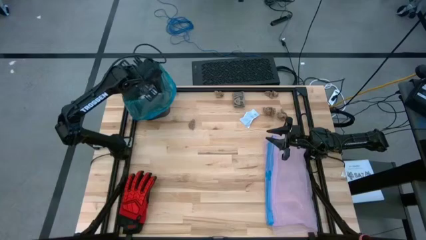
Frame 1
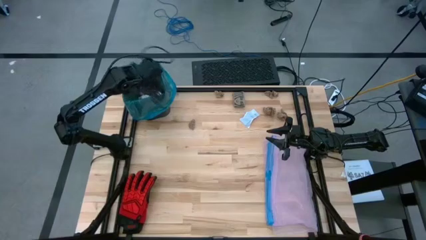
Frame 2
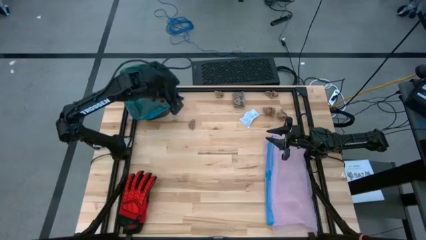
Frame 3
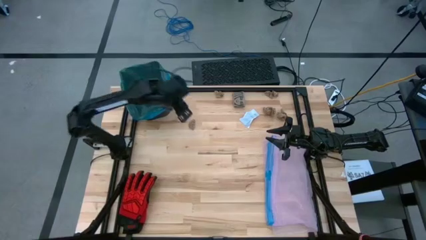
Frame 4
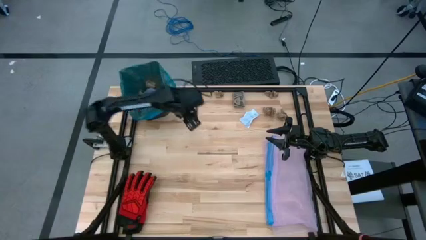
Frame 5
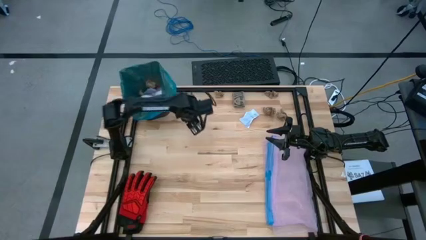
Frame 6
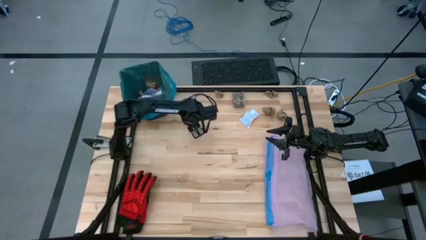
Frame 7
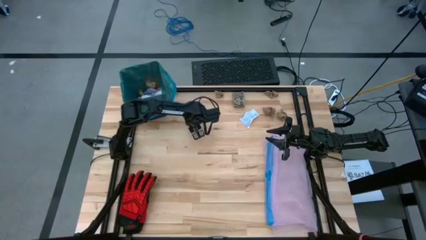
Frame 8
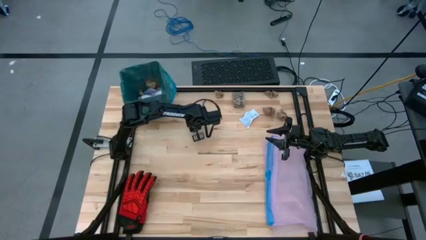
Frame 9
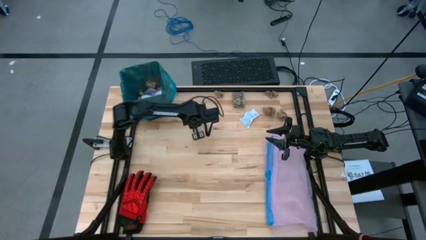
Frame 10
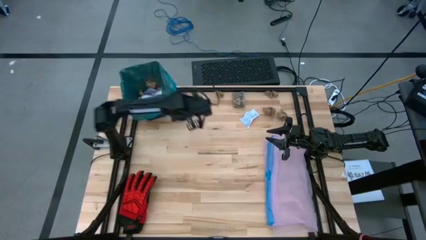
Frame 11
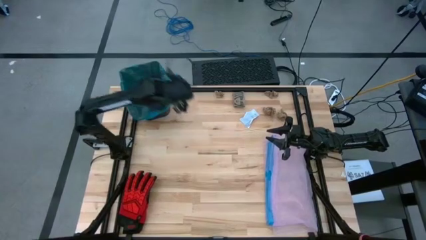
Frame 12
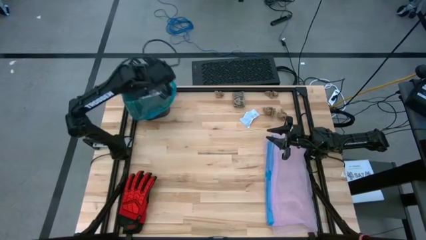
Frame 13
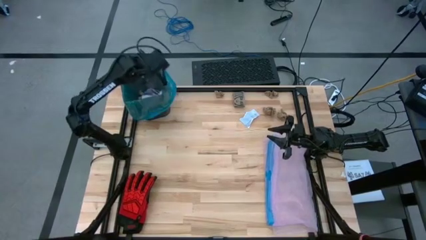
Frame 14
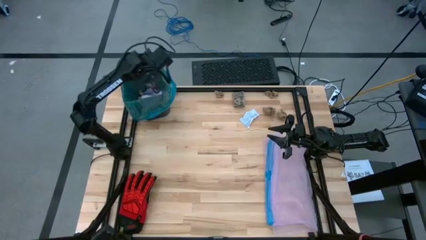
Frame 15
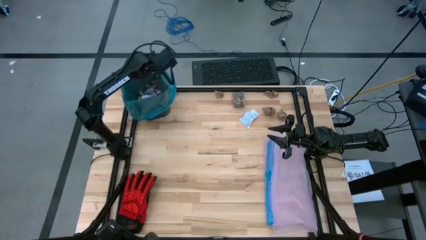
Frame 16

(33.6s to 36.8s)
Task: place trash/remove bag and relplace
Put the brown napkin in the trash bin

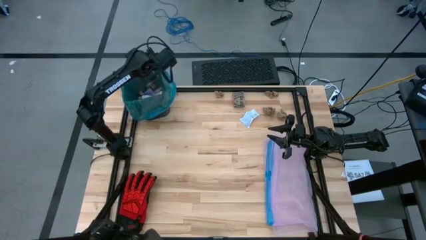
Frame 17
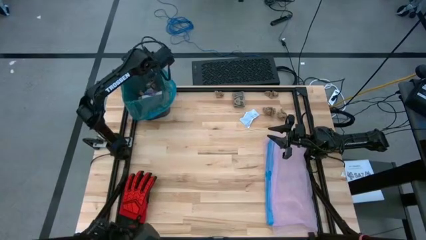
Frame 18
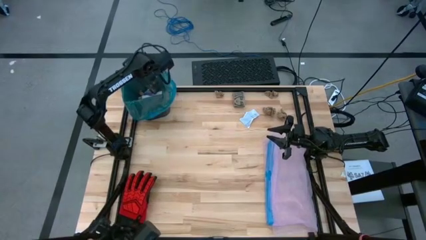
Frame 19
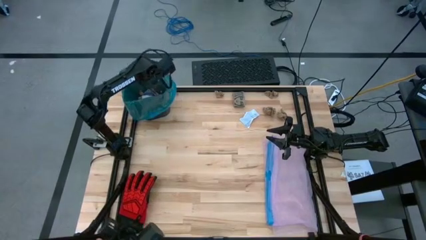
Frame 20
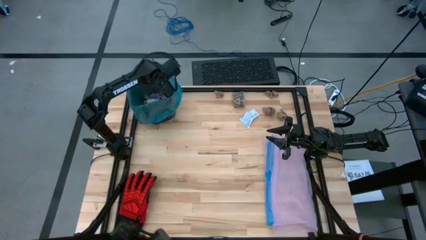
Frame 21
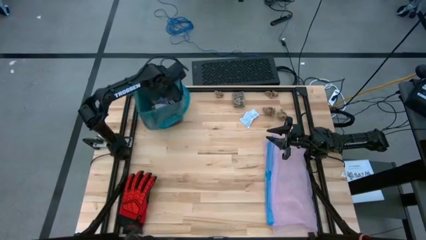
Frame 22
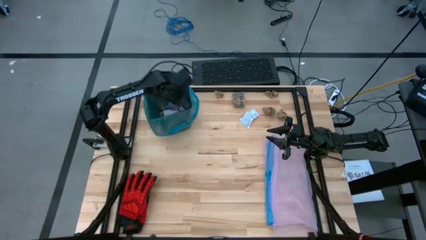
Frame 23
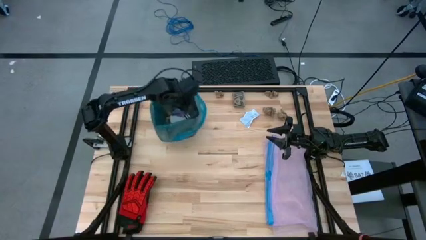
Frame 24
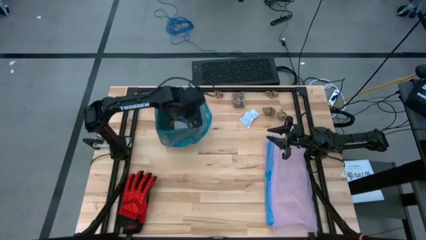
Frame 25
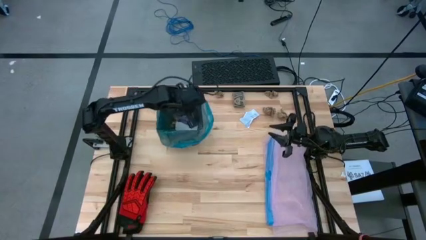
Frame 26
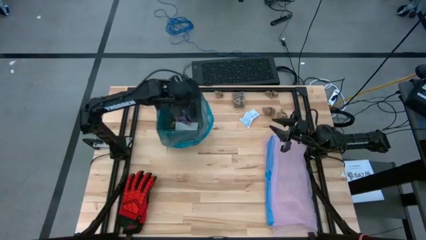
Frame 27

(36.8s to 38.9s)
Move the trash bin to the center of the table

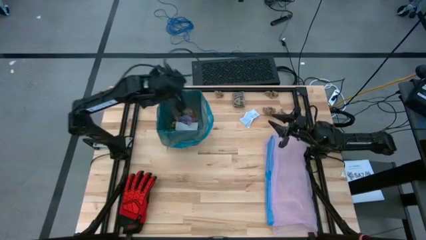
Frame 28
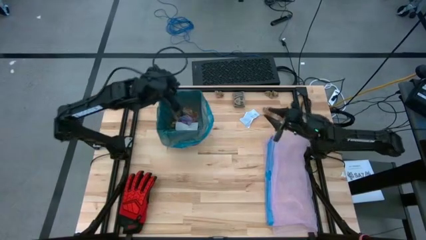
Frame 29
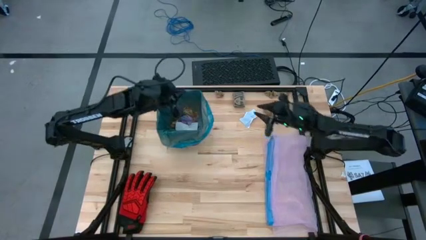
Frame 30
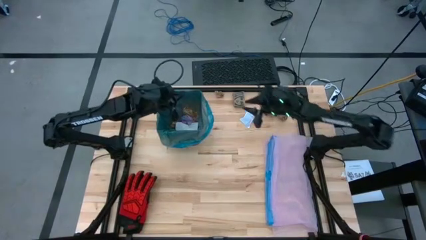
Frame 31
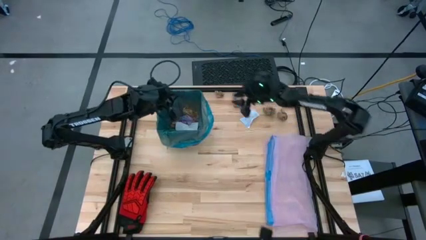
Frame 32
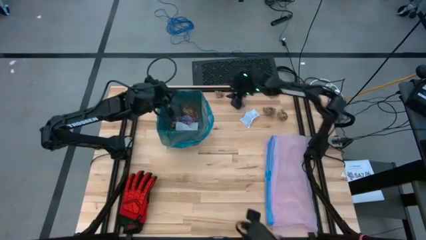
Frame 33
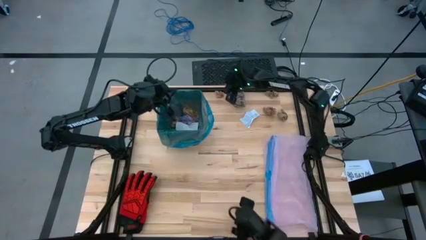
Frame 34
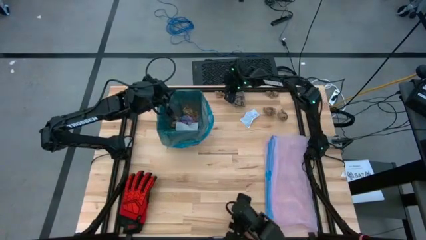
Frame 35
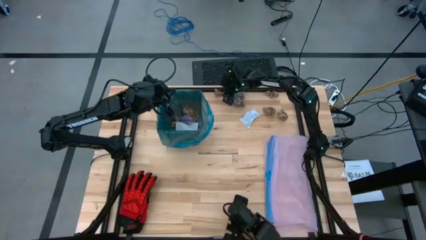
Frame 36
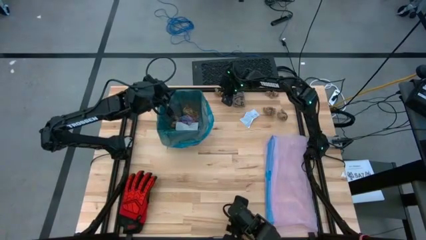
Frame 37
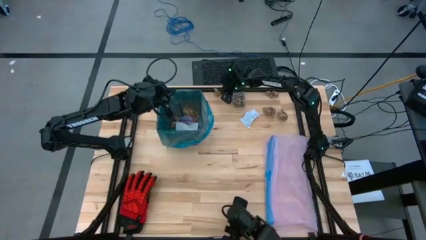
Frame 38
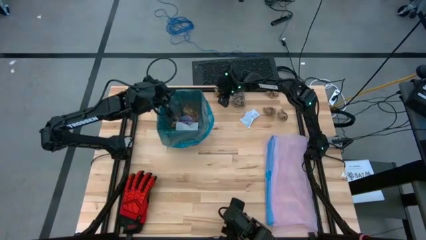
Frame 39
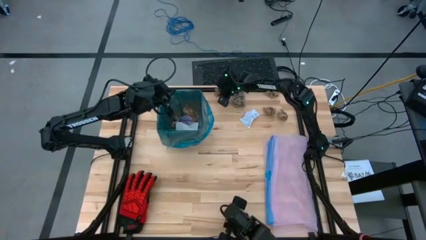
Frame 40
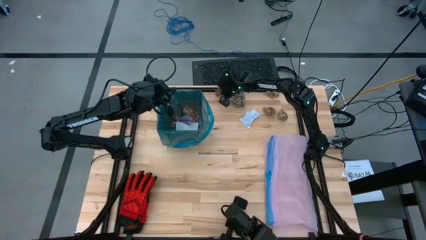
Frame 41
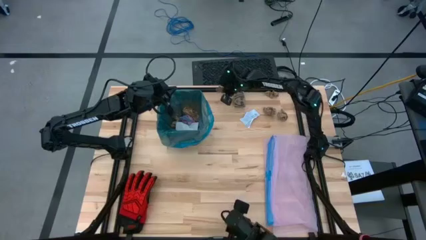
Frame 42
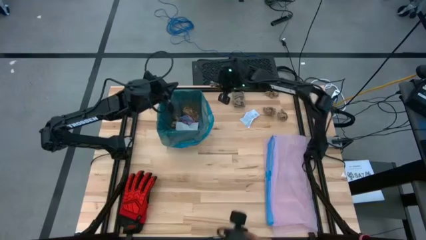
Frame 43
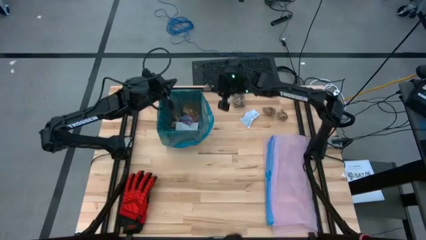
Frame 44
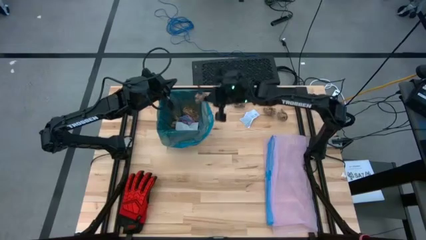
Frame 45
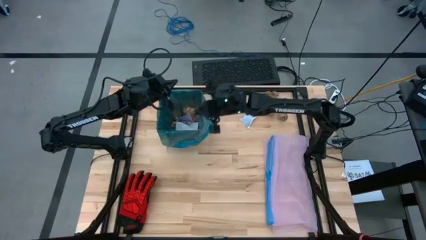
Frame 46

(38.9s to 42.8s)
Put the brown napkin in the trash bin

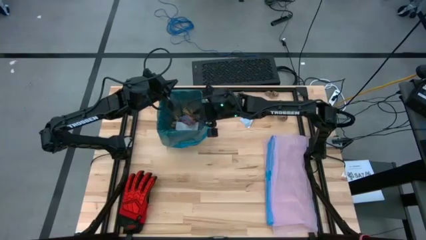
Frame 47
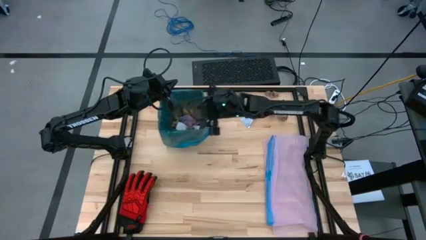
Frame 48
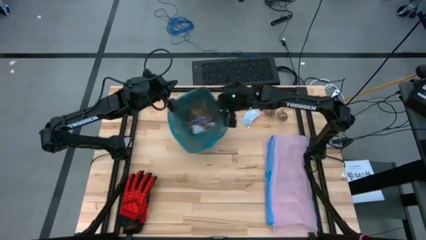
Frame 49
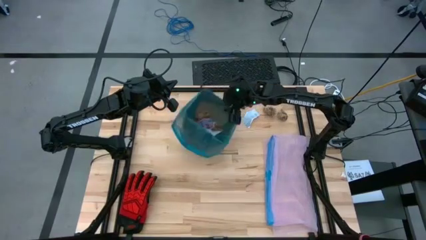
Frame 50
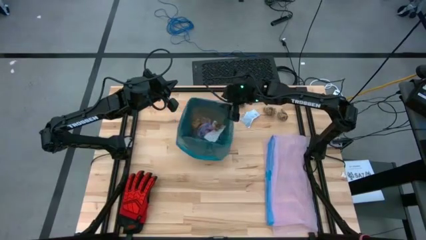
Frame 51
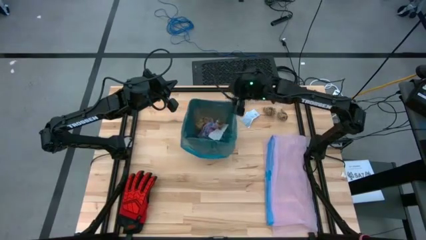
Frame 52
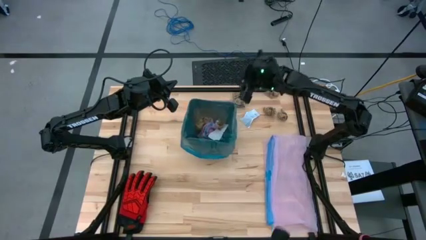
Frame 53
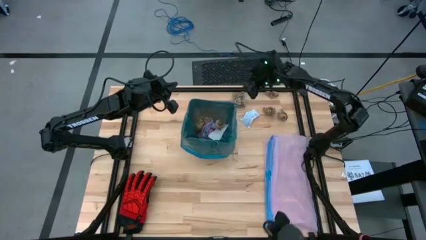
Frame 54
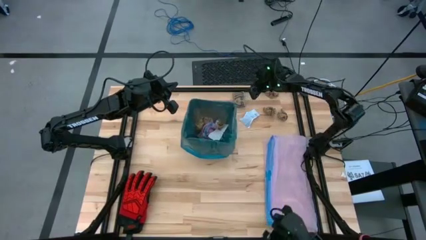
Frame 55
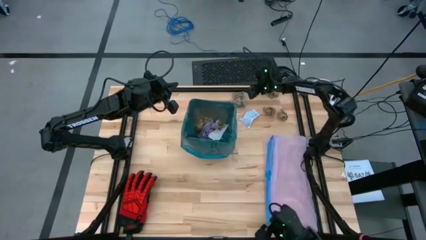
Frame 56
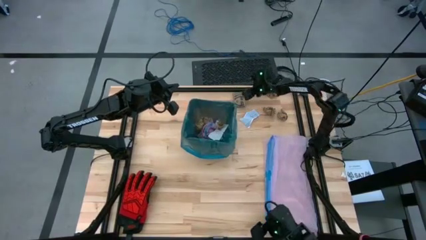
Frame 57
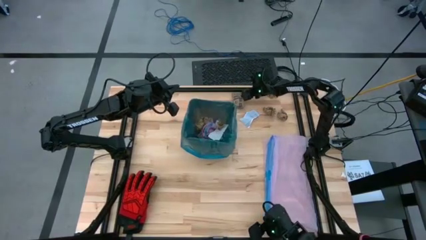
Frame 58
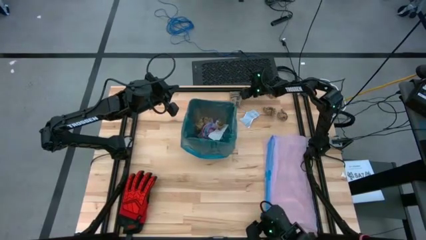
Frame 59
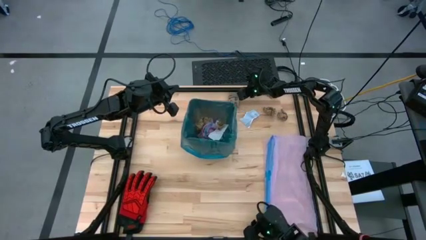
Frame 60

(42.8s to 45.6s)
Put the cardboard coffee sleeve in the trash bin

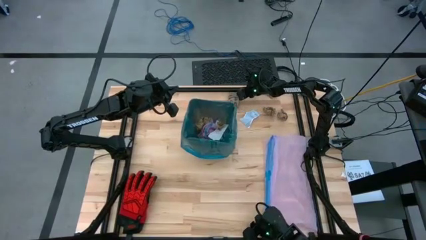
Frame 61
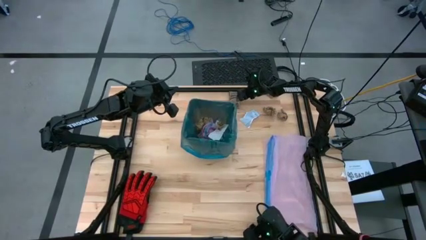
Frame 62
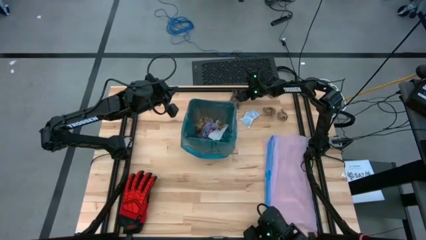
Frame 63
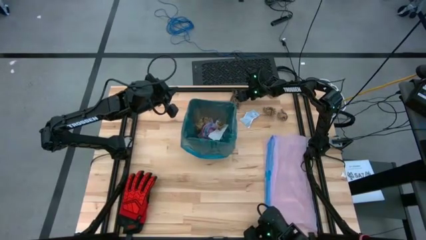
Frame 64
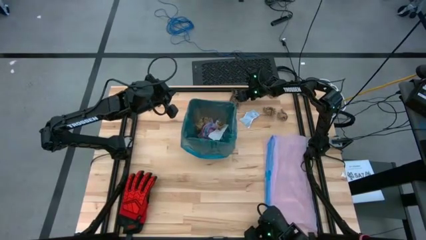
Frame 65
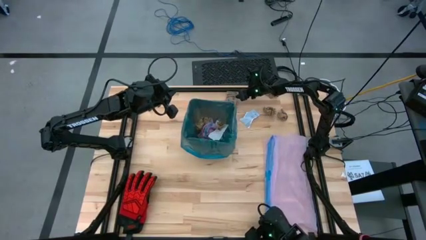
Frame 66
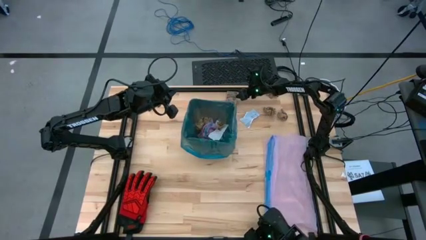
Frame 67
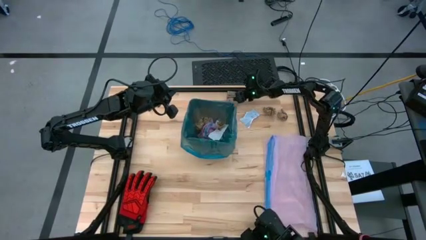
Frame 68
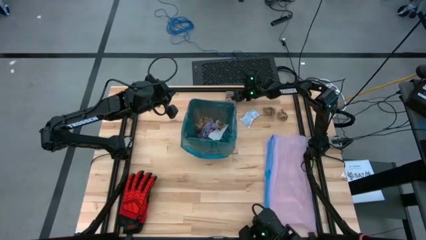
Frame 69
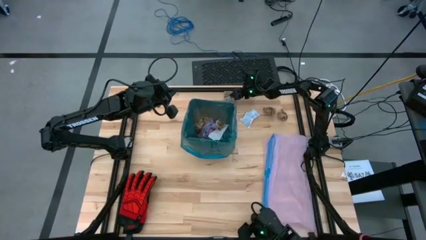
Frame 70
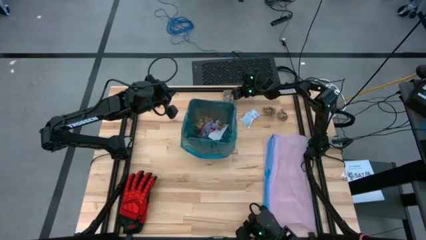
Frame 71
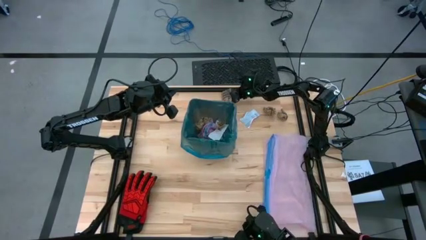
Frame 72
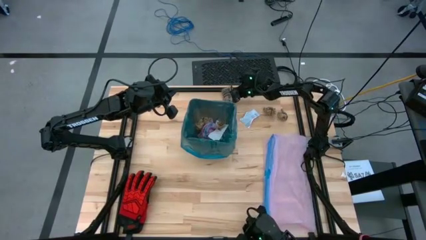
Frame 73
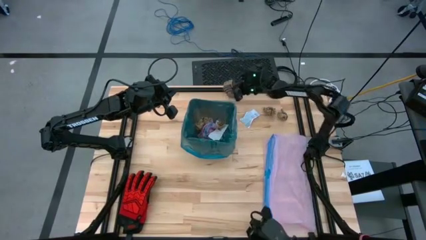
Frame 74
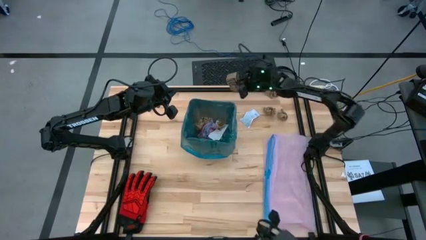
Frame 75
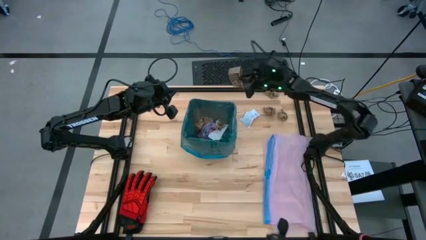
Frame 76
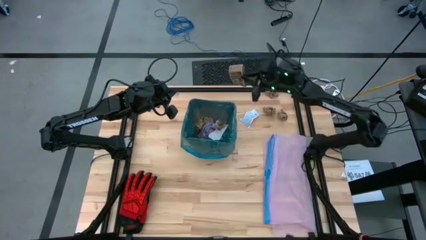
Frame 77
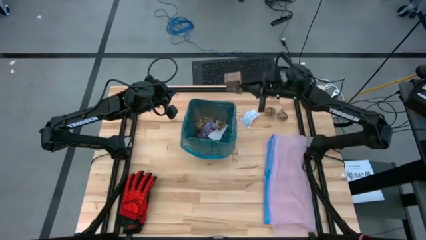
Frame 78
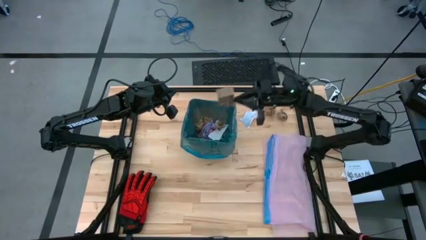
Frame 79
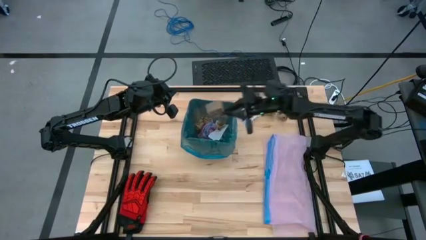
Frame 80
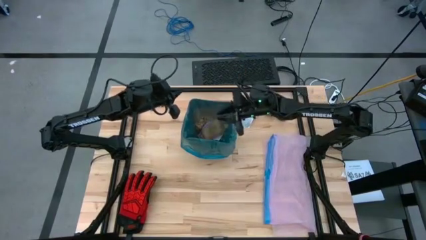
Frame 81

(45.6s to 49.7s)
Put the cardboard coffee sleeve in the trash bin

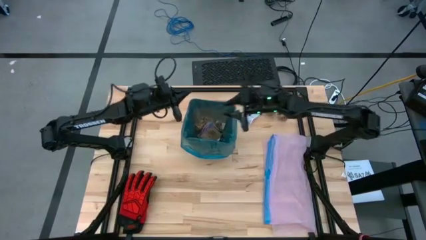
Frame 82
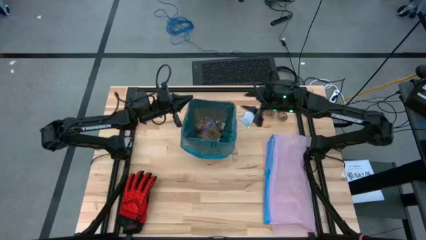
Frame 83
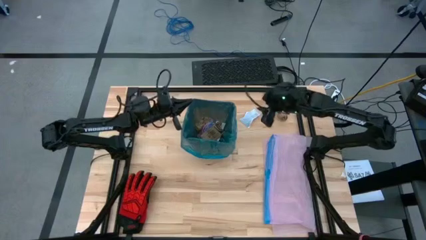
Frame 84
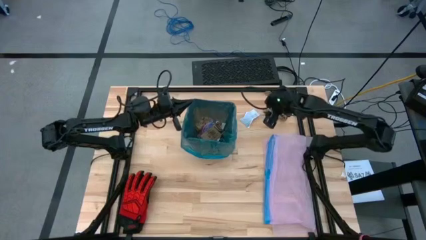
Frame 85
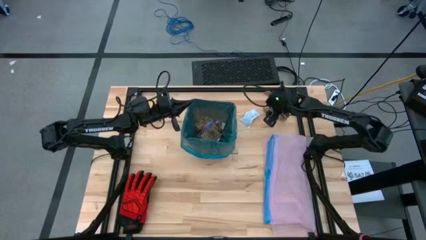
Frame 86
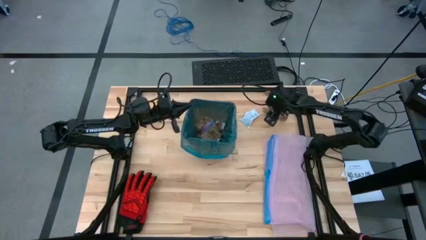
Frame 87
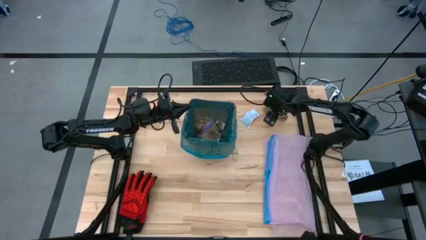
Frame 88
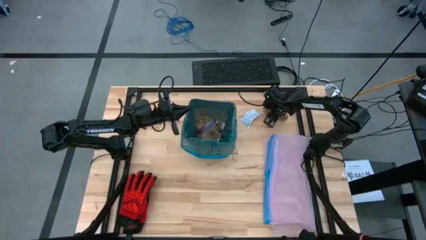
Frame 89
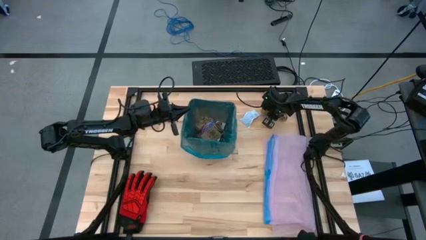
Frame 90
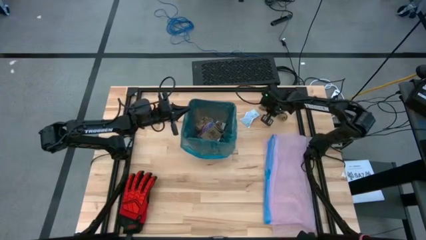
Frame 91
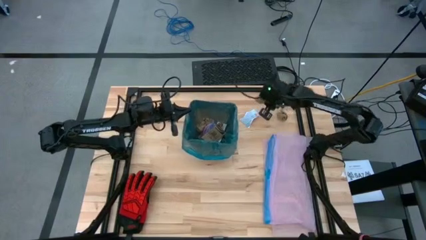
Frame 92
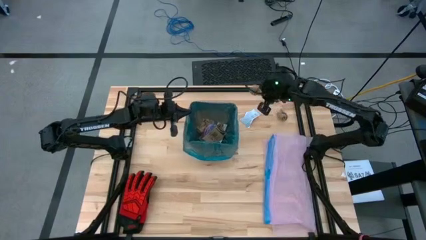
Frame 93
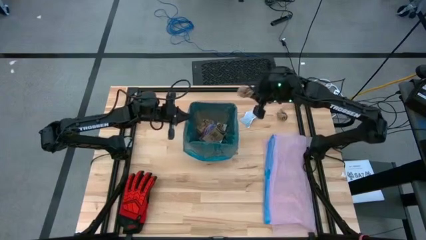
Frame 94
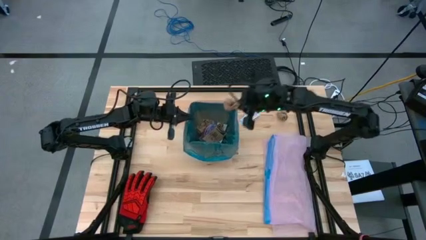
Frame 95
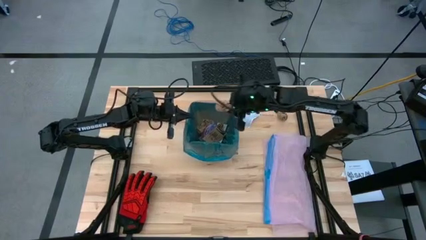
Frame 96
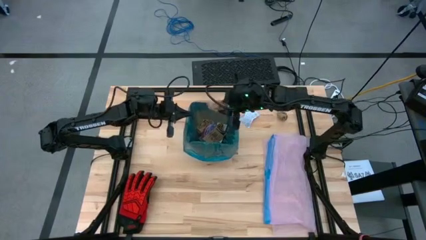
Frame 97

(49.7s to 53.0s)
Put the brown napkins in the trash bin
